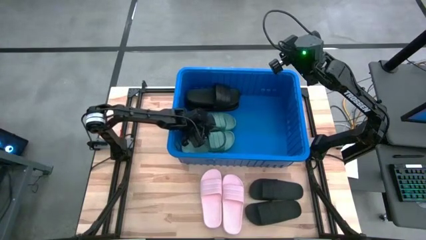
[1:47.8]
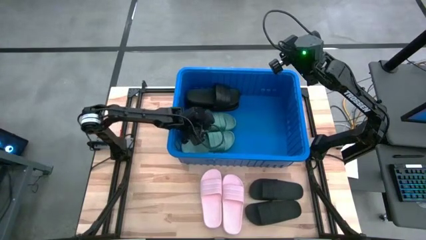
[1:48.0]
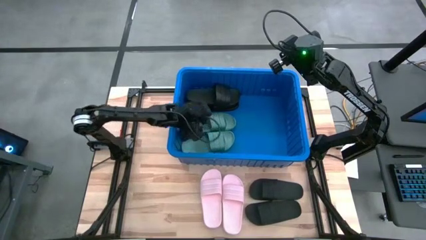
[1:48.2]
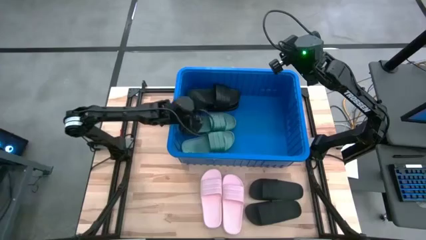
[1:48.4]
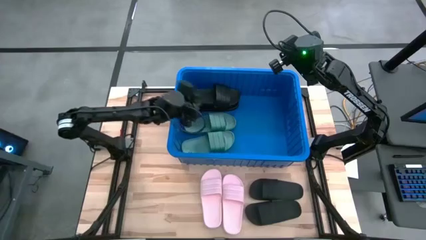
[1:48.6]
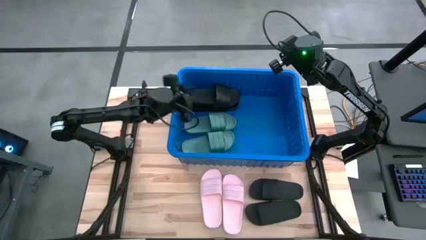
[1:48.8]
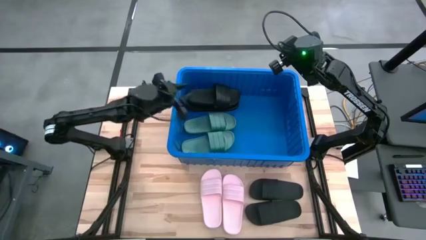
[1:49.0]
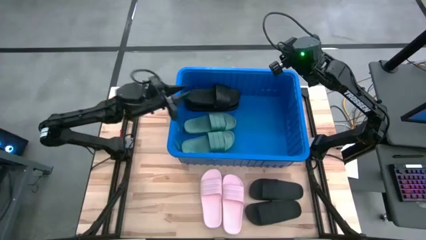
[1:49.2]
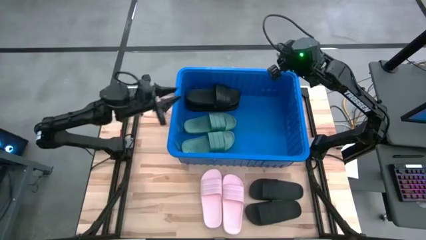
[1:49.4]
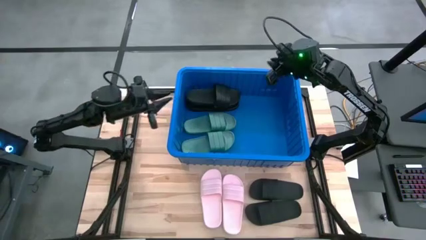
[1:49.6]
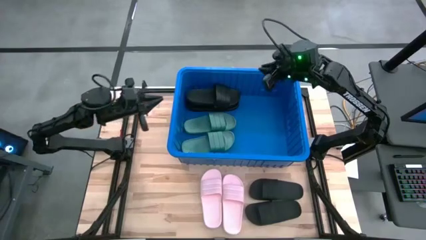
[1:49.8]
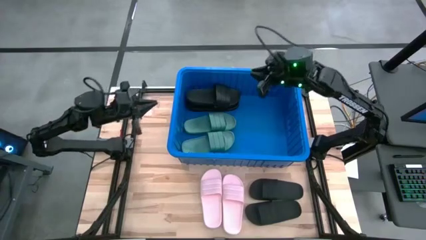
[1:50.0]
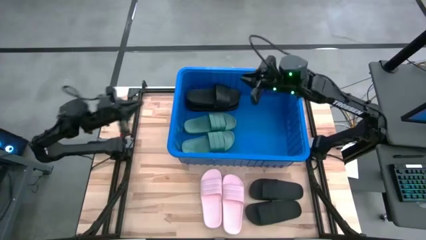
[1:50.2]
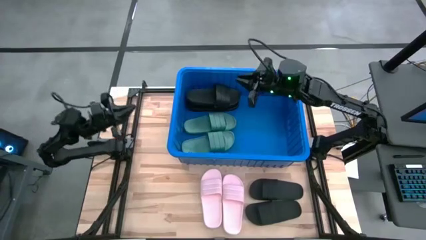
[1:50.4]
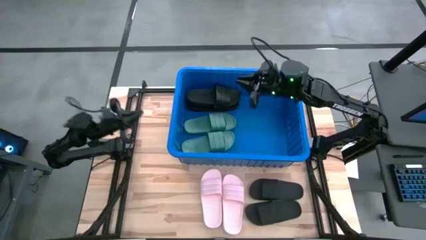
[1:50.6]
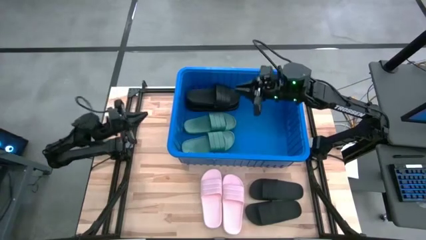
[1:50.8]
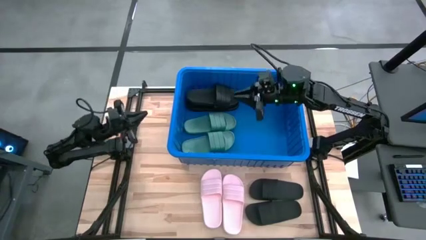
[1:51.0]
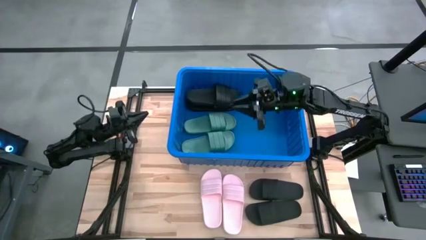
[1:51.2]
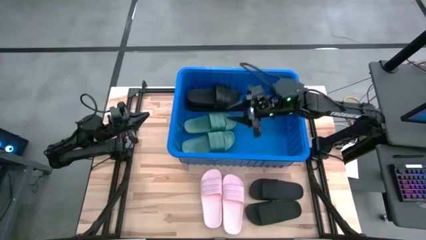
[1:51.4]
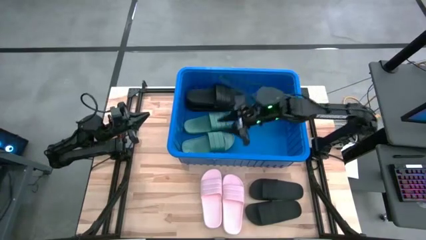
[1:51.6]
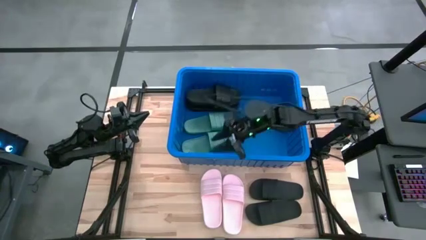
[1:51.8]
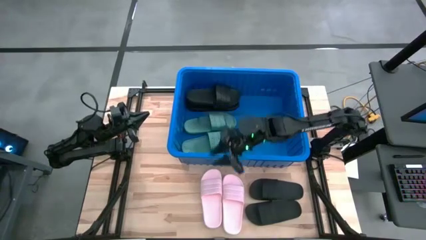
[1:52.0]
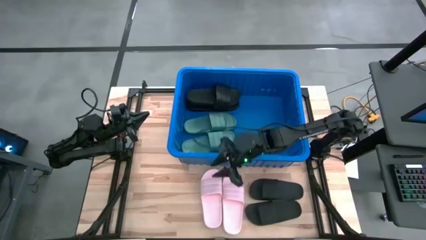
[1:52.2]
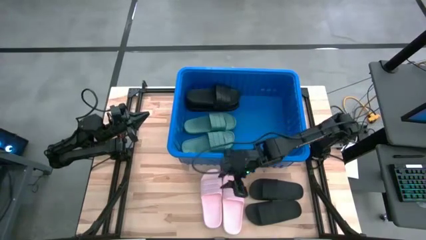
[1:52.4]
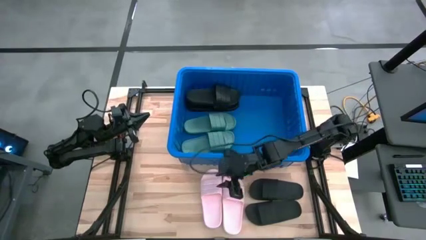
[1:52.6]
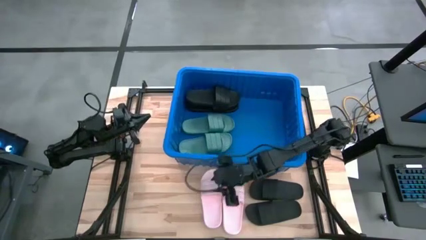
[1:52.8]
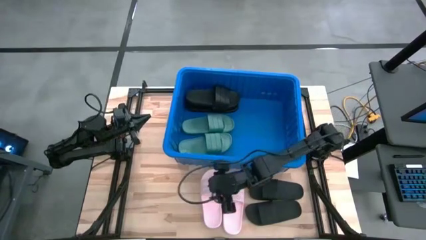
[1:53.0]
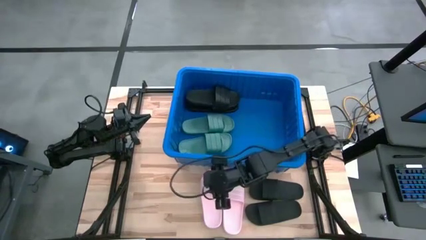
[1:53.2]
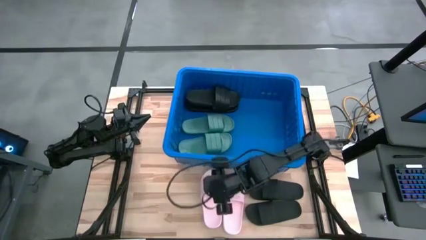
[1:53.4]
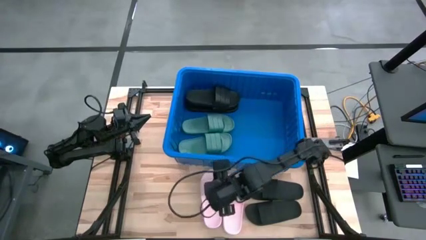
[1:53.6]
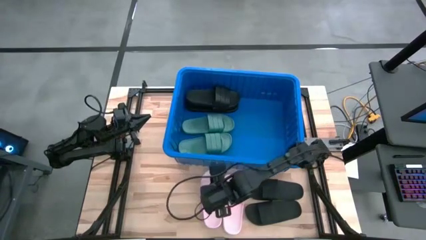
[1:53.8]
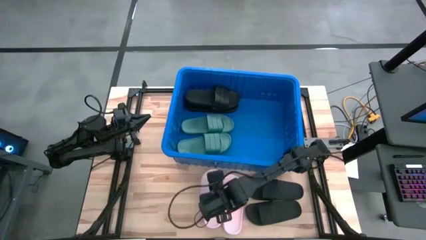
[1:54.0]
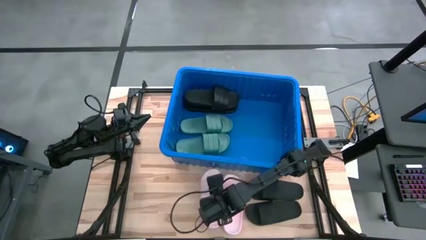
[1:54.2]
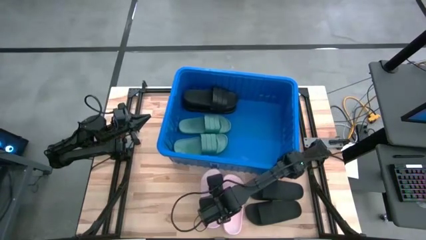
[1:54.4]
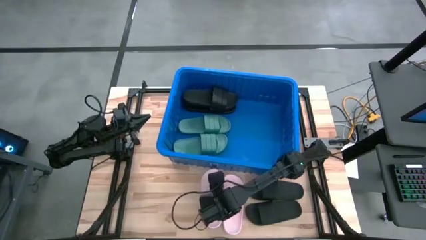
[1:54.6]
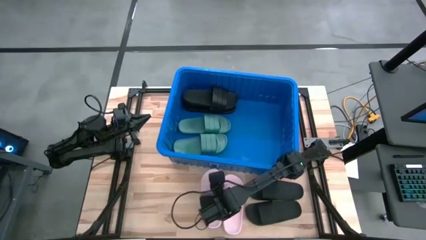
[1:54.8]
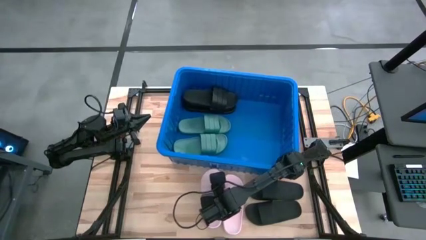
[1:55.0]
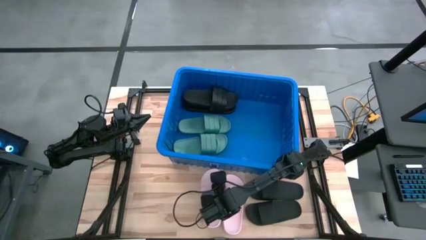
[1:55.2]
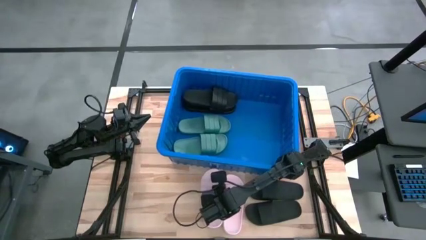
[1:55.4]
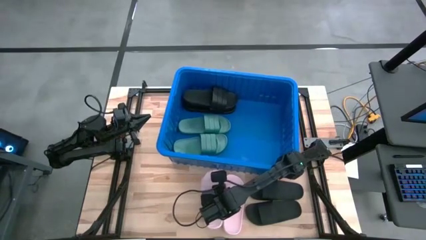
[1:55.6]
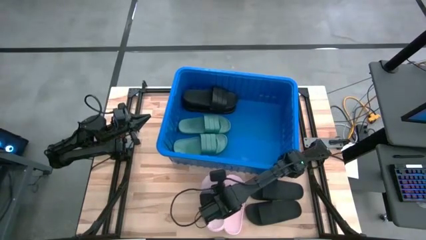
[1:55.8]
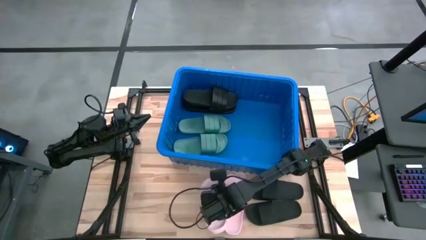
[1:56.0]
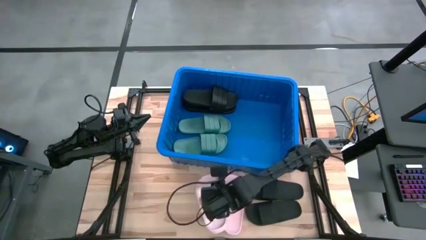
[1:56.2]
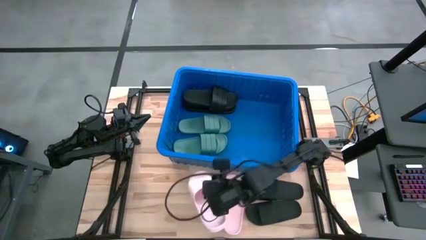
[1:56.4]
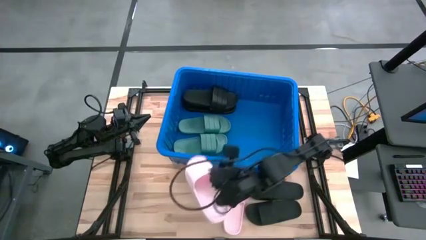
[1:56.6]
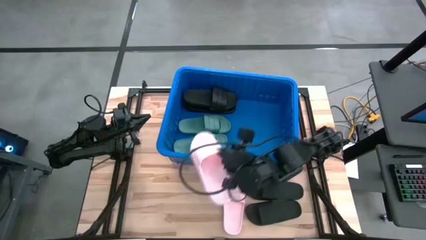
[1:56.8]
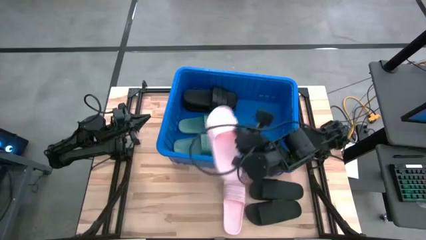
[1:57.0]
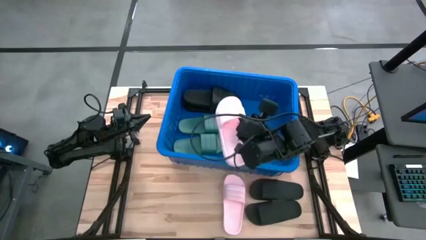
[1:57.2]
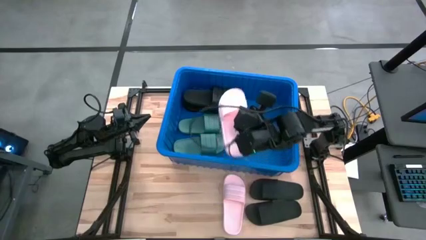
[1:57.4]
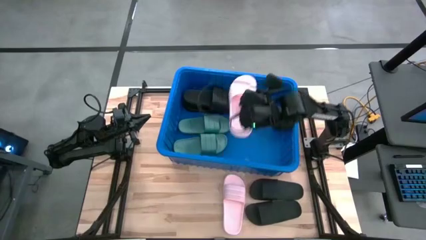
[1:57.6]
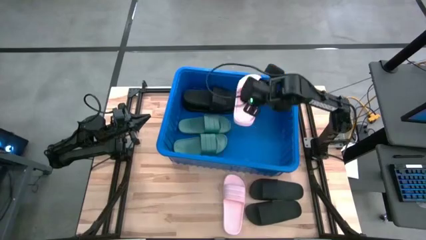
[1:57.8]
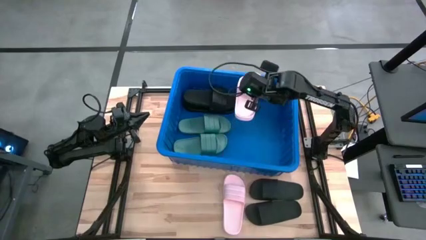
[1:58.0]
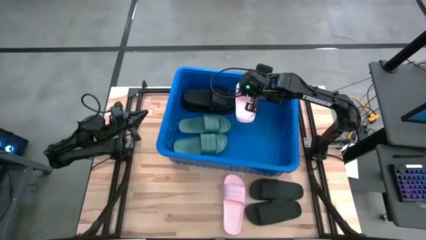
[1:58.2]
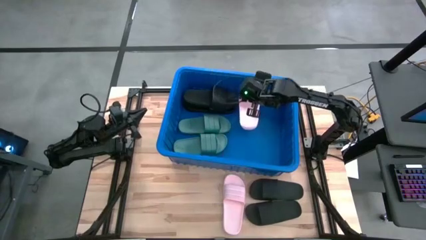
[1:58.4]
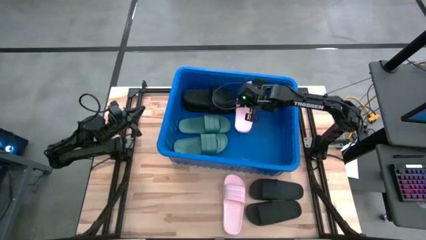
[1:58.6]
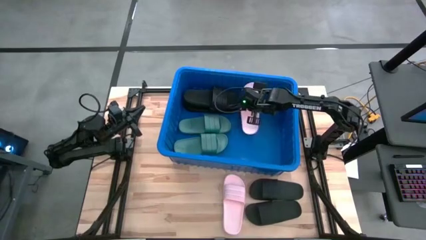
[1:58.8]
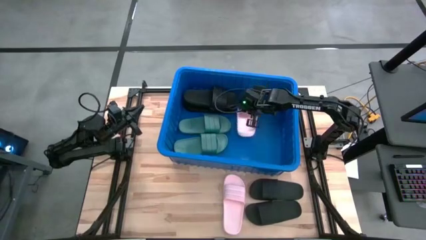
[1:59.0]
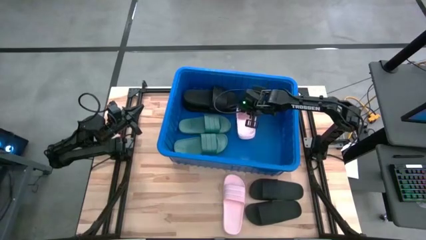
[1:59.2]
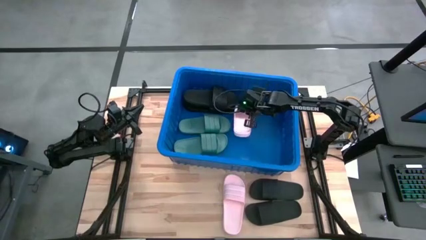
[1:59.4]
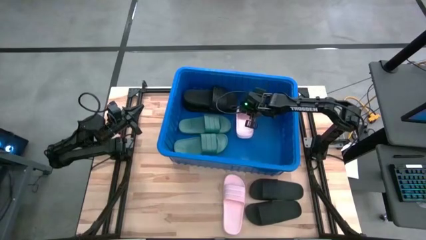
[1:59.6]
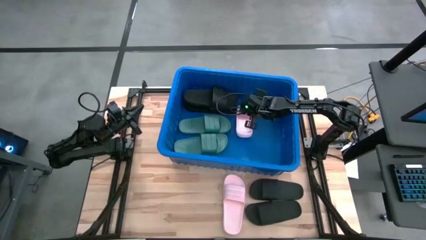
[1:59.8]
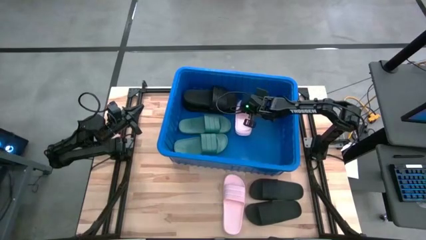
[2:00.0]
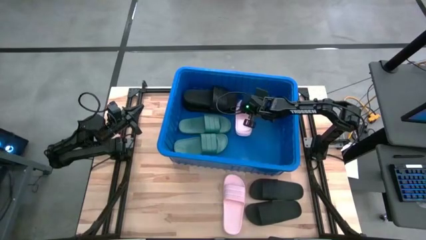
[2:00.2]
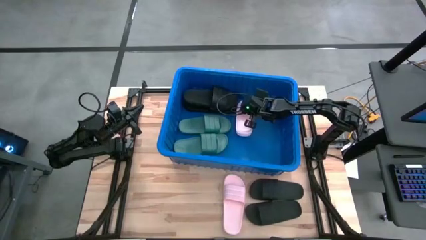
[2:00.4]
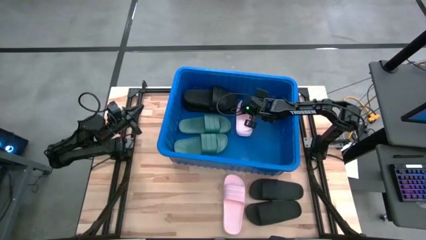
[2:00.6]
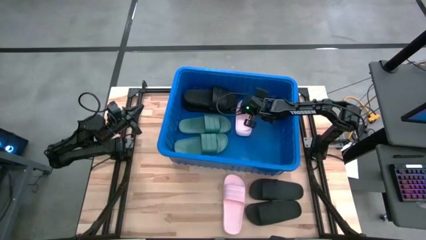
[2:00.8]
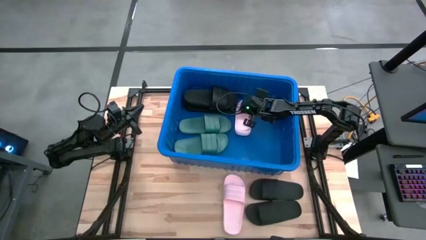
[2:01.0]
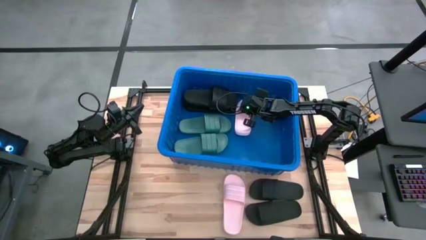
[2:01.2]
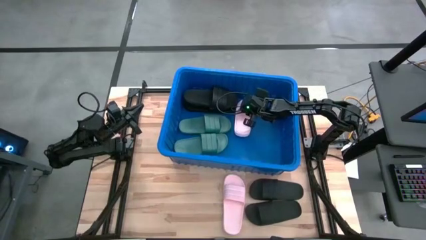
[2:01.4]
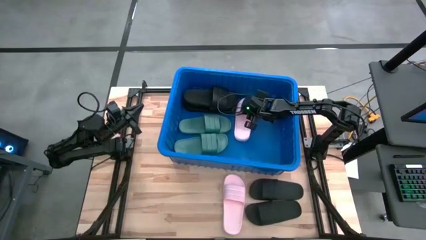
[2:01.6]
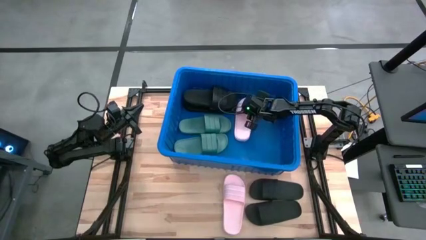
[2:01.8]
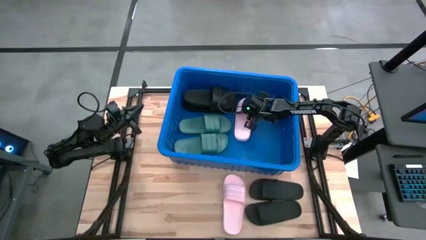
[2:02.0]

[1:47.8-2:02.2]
Task: Pick and place slides into bin
Put the pink slipper into the blue bin
